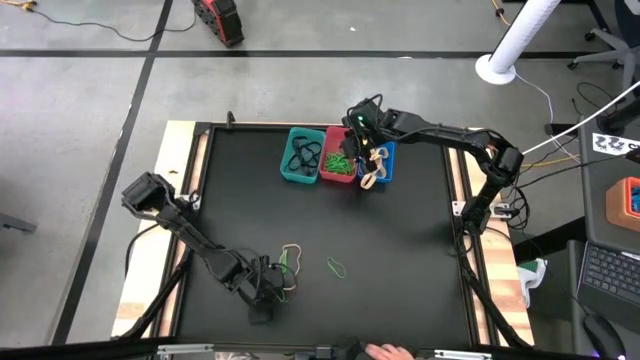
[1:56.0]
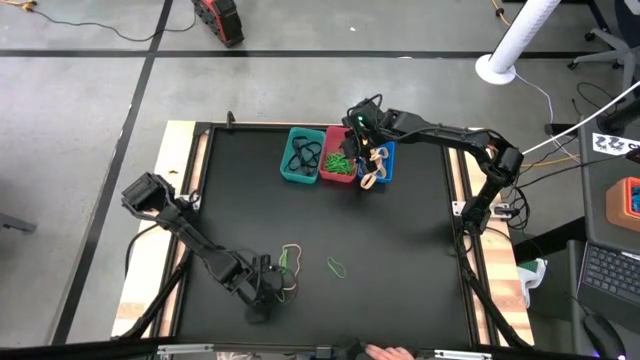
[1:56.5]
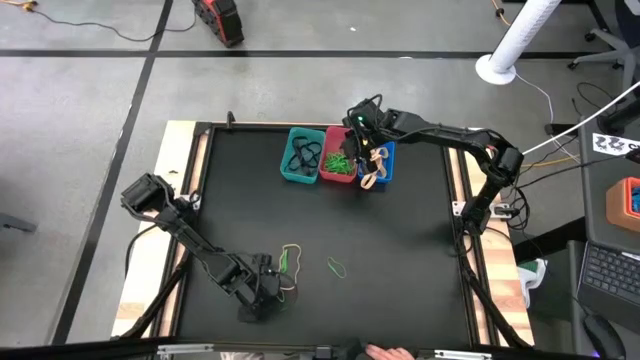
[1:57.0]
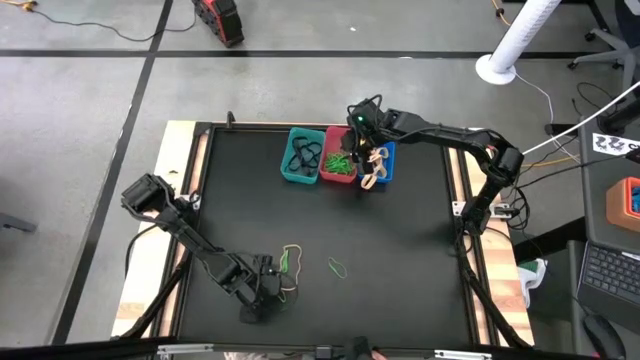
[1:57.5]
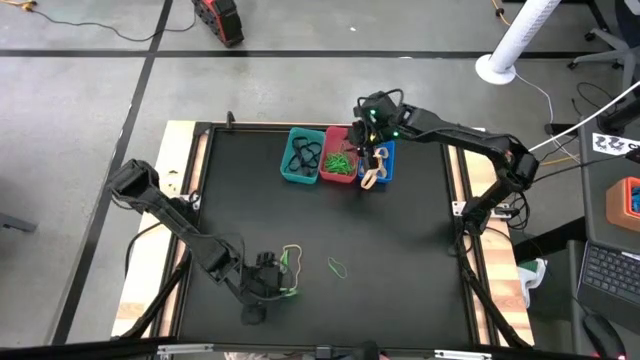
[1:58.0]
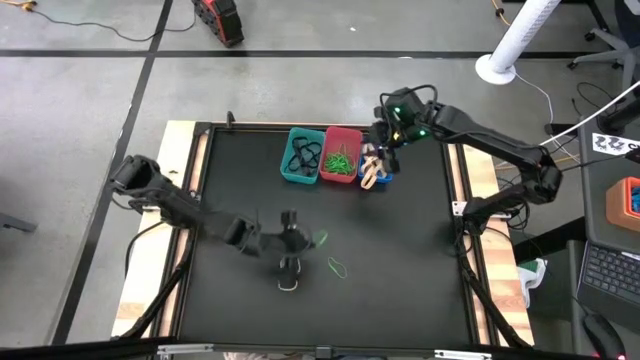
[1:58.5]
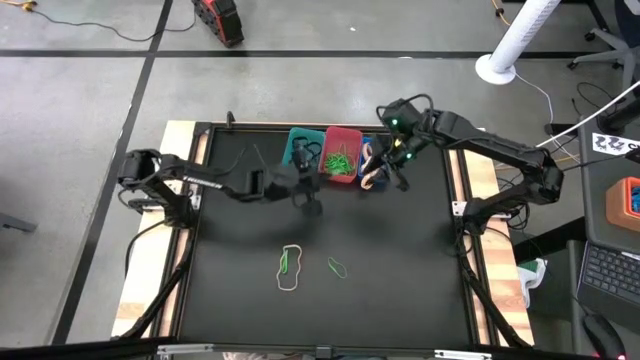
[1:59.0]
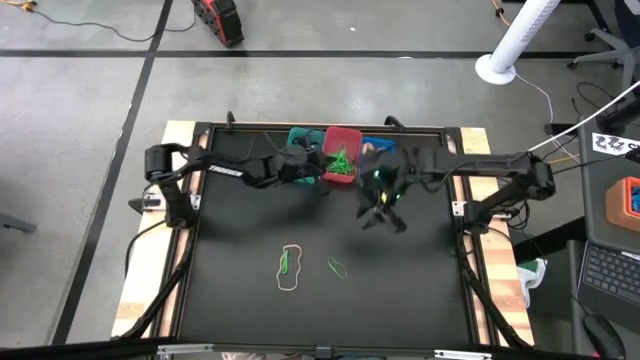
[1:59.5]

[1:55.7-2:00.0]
Task: Sort rubber bands into baskets
Put the green rubber band into the pink bin

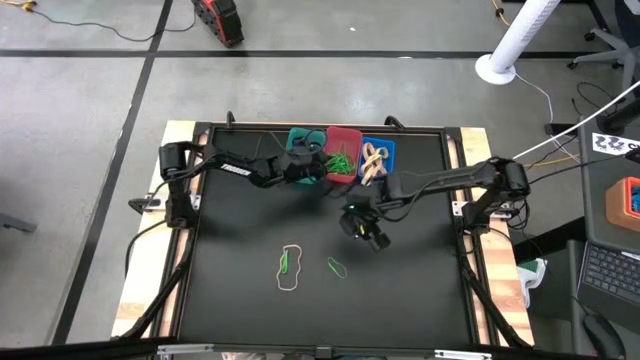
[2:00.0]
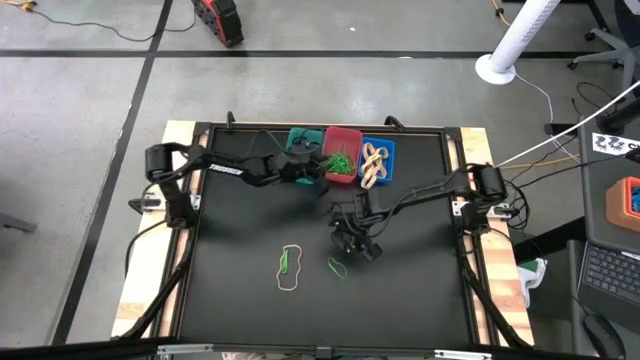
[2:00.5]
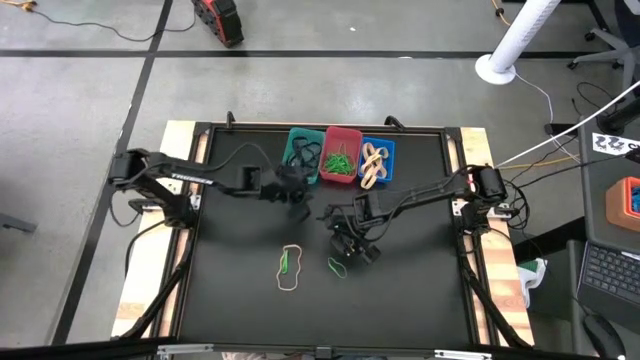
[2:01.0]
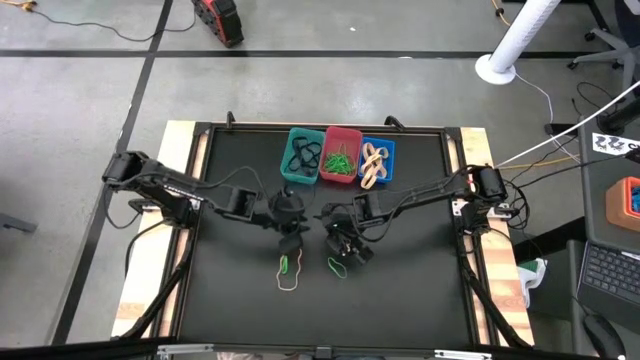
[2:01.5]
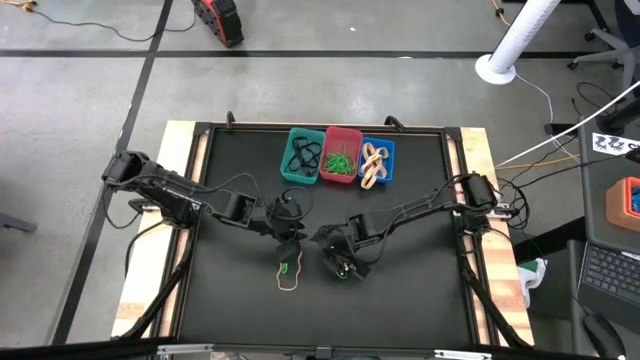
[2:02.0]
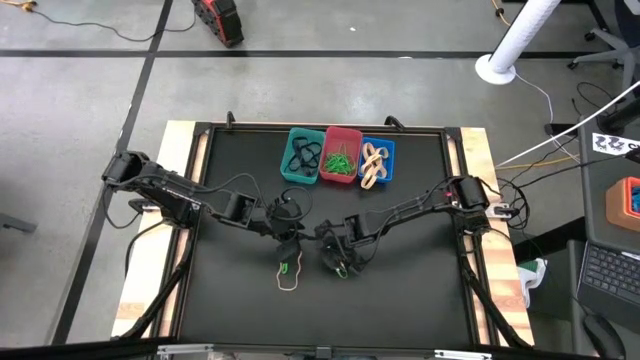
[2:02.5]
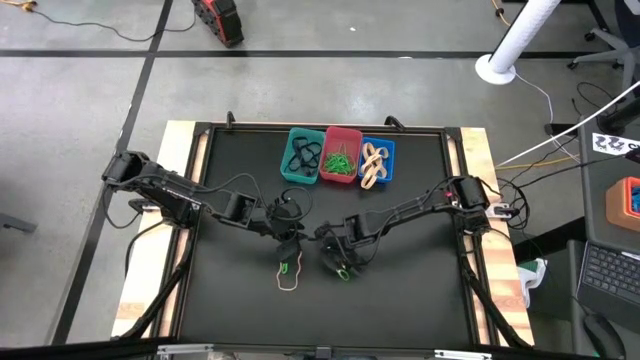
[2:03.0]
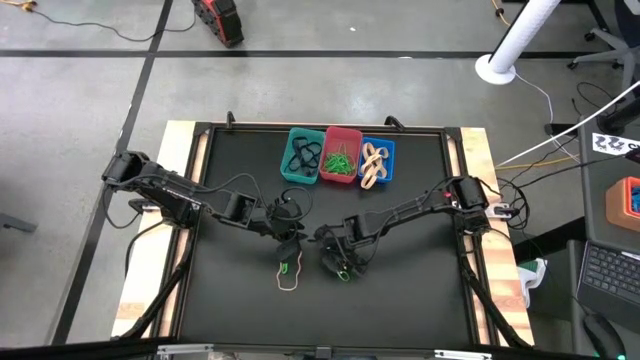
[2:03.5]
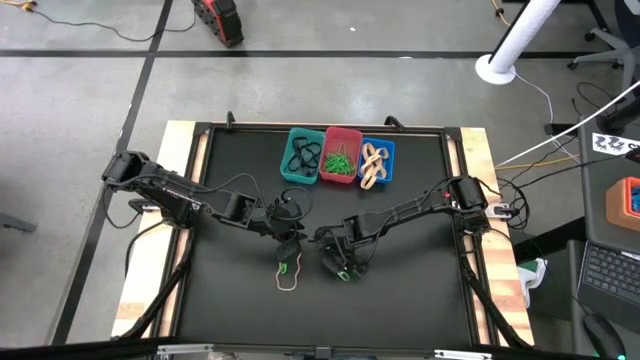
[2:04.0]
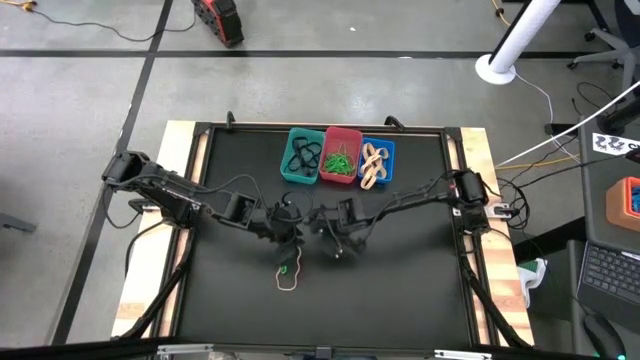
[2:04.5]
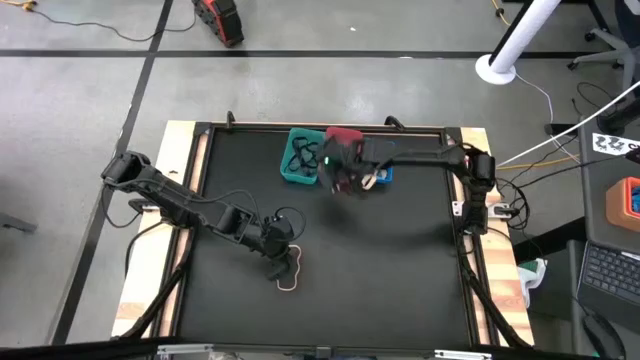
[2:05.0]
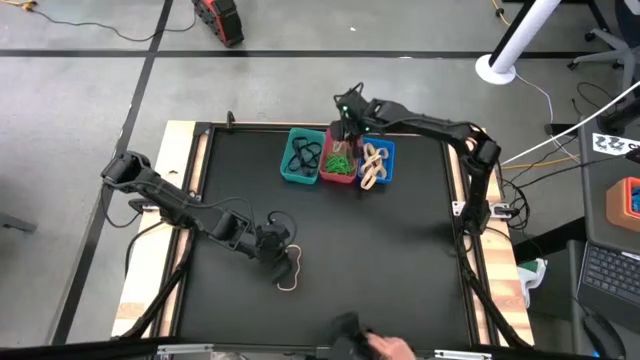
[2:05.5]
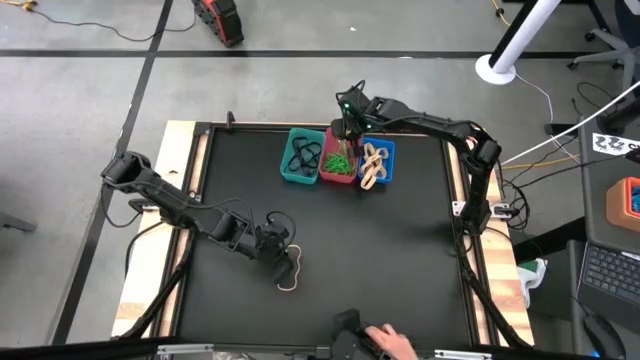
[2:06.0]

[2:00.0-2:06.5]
Put the green rubber band into the pink bin

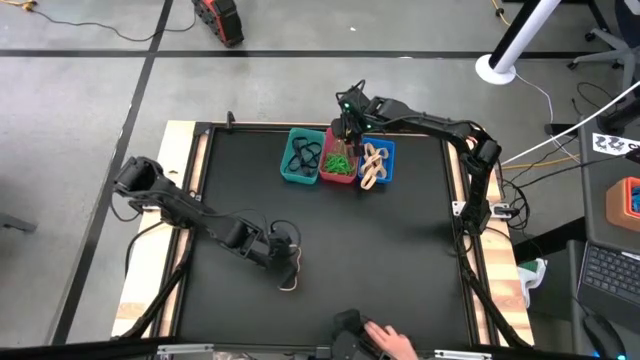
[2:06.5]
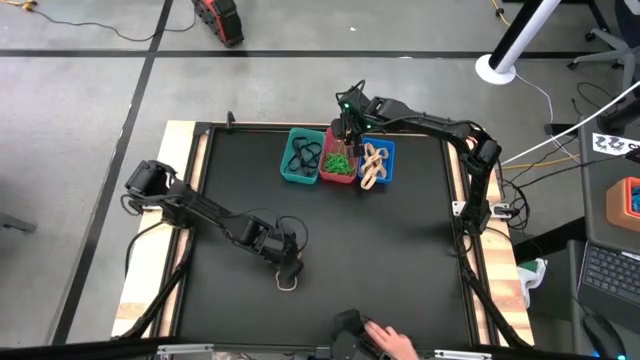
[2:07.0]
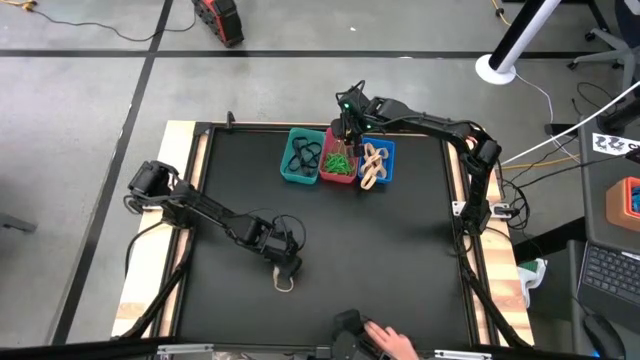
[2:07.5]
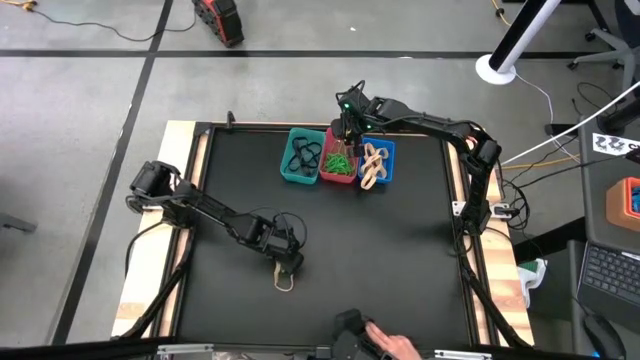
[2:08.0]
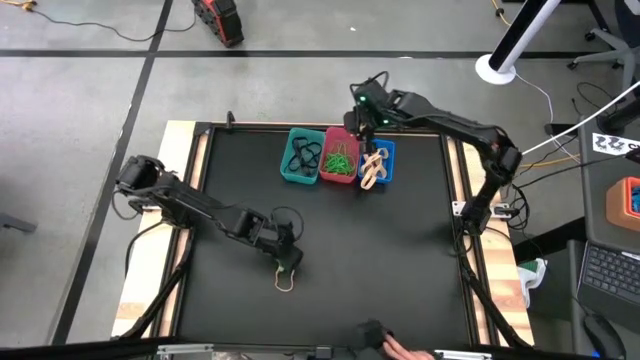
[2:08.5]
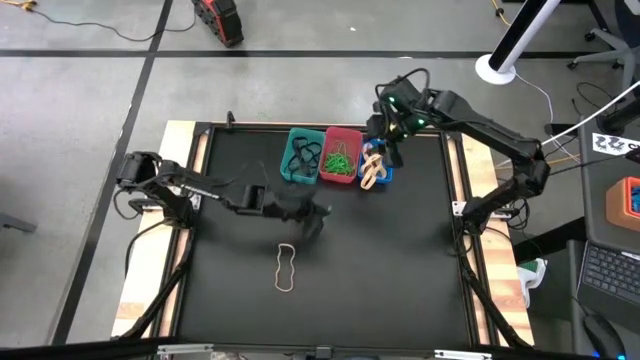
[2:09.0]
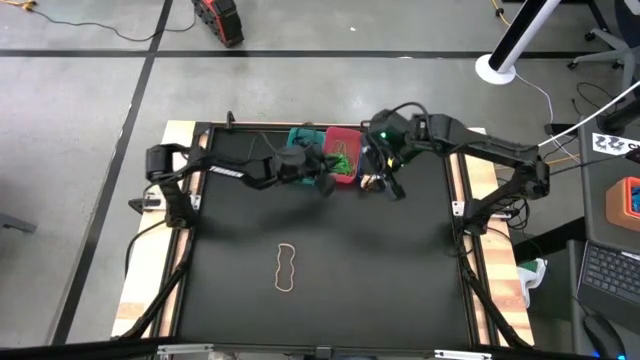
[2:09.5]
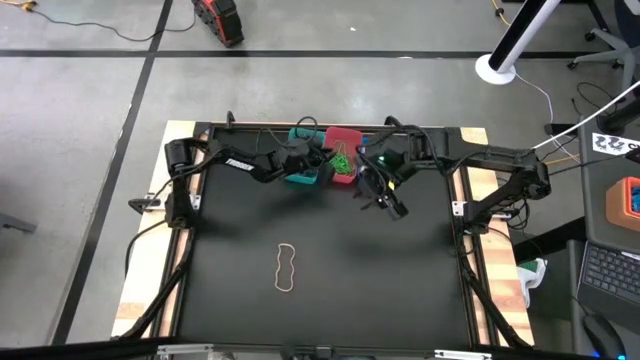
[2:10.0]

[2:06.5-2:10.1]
Put the green rubber band into the pink bin

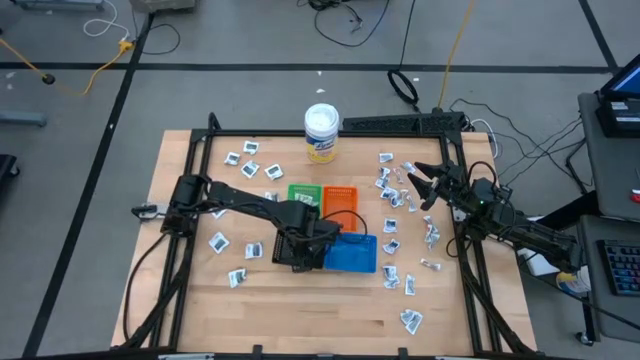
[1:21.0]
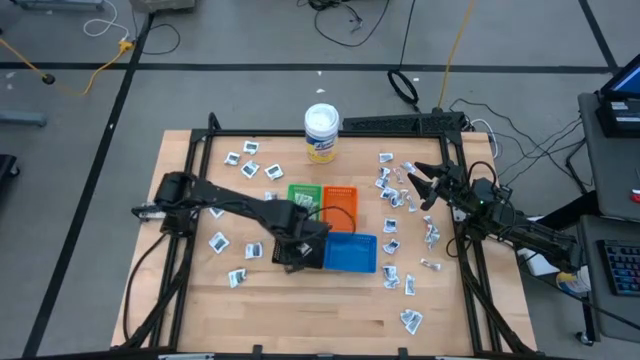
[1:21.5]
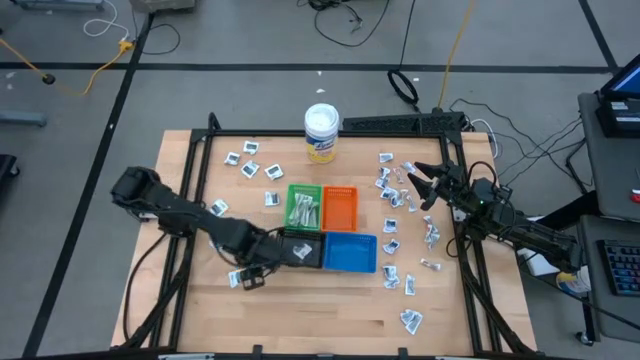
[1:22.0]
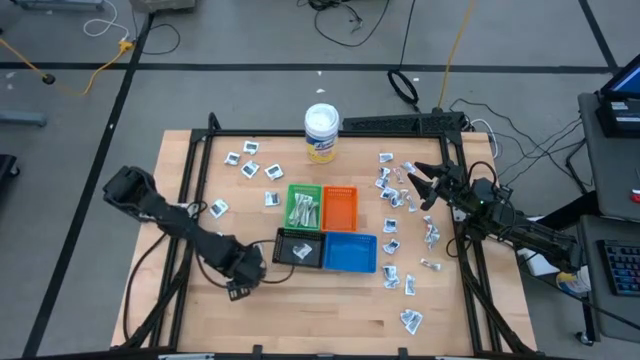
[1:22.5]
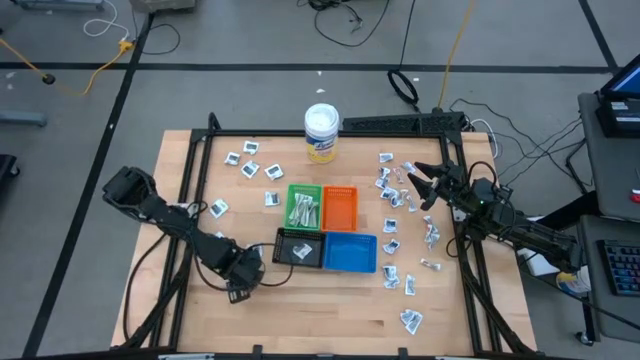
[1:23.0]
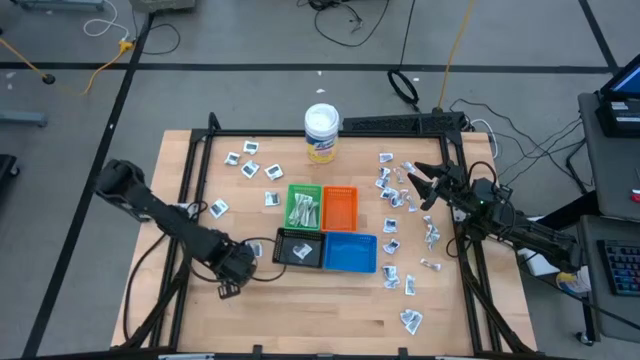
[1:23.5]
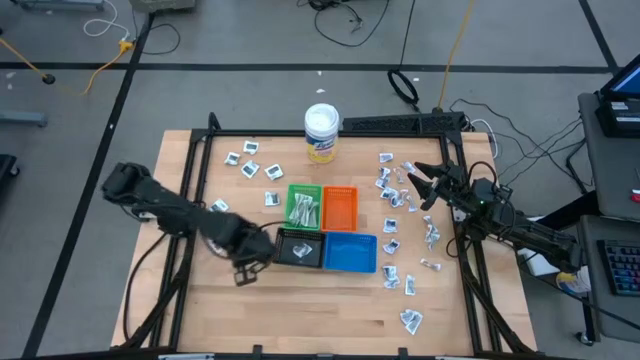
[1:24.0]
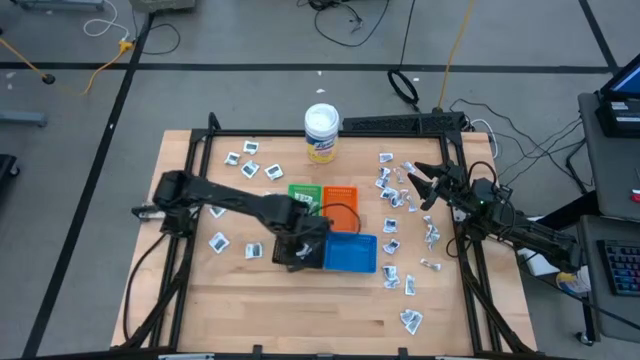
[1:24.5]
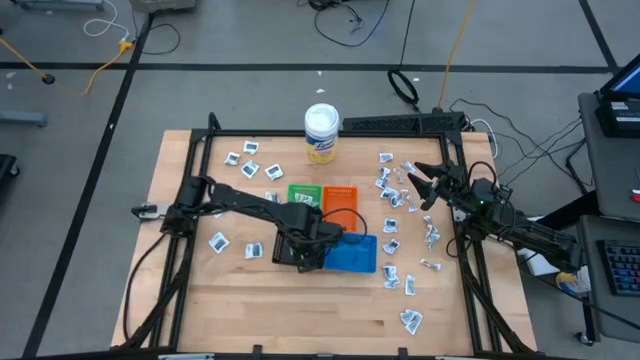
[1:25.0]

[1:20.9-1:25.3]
Task: Pick & Place First Aid Supplies
Put the towelette pack into the black bin

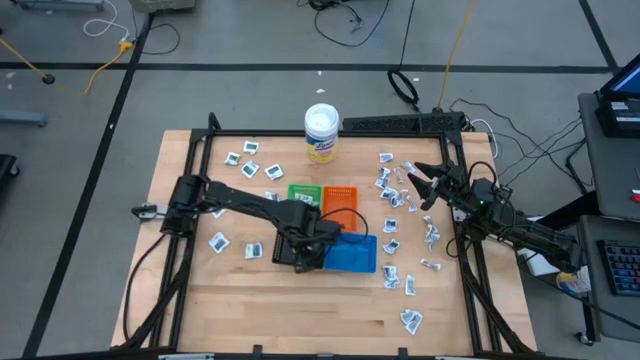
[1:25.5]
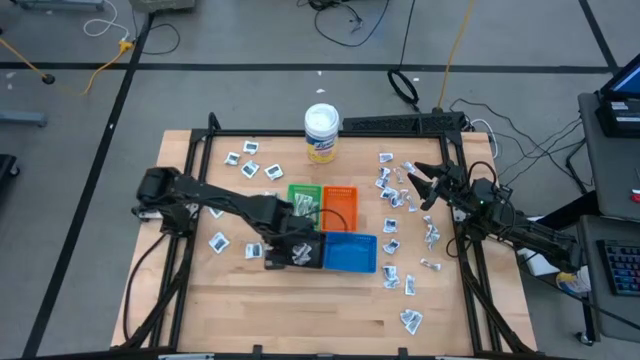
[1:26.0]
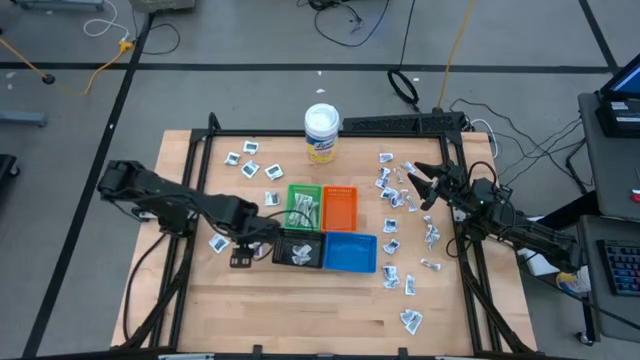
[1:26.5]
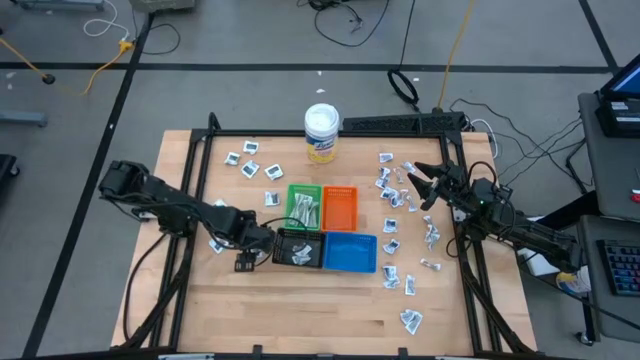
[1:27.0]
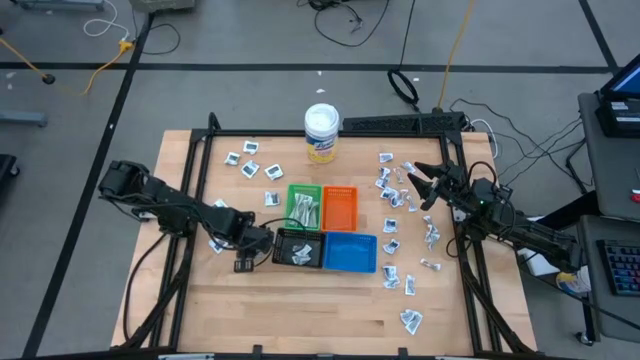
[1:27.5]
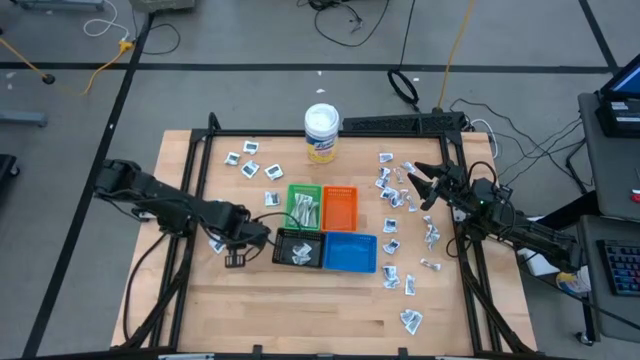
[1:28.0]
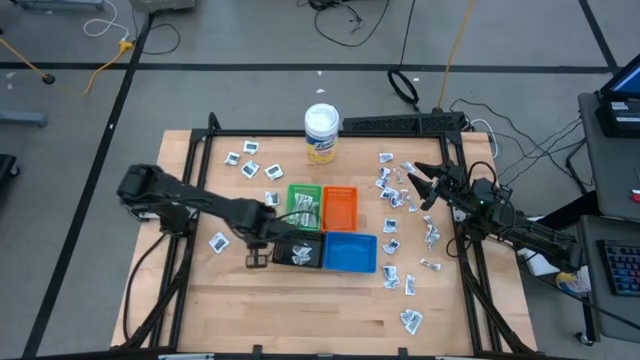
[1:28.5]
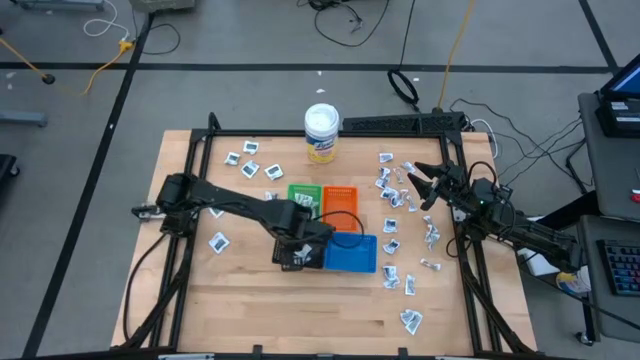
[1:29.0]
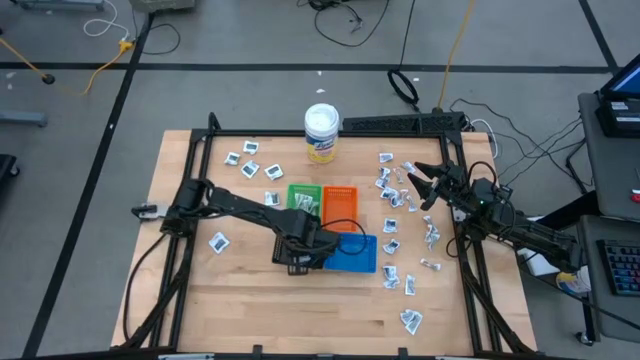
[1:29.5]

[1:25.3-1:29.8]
Put the towelette pack into the black bin
